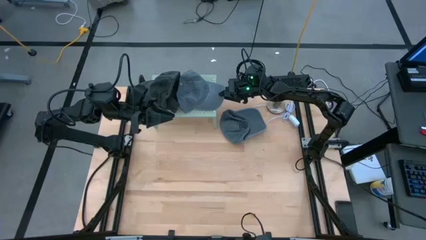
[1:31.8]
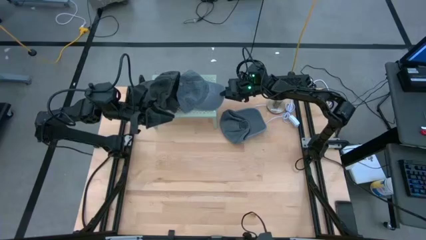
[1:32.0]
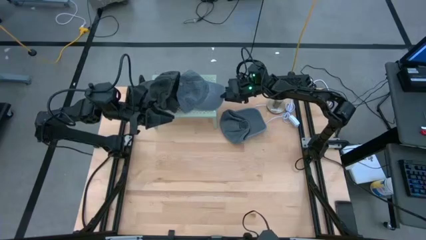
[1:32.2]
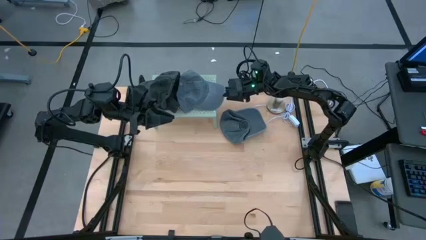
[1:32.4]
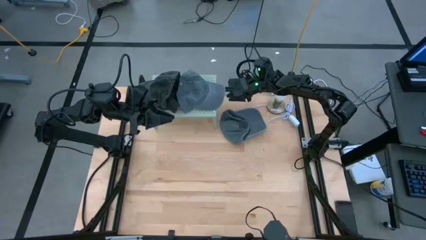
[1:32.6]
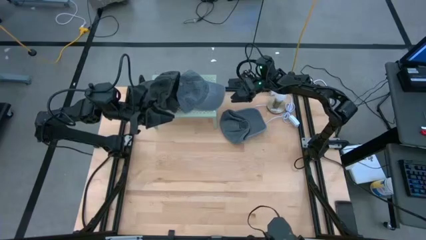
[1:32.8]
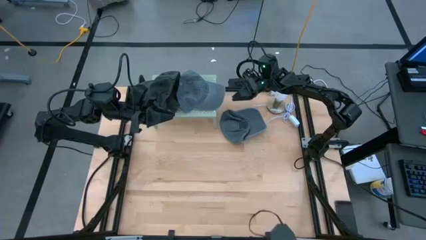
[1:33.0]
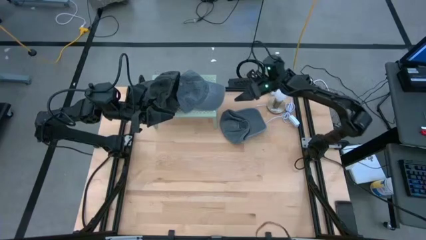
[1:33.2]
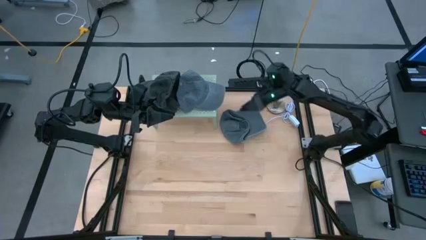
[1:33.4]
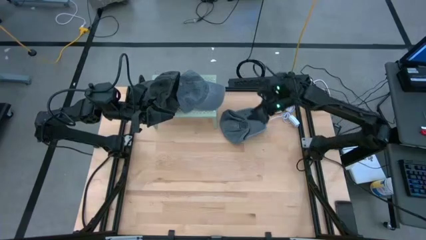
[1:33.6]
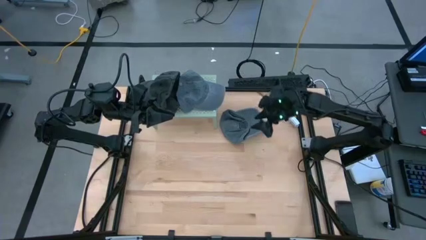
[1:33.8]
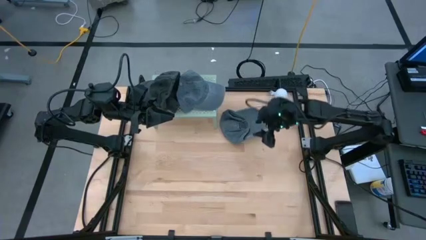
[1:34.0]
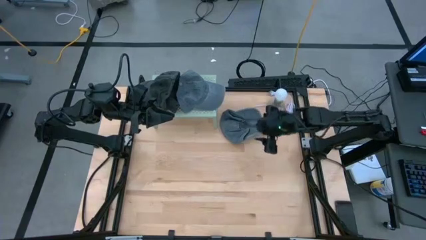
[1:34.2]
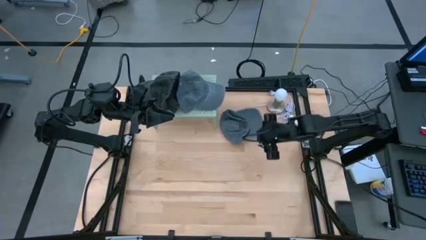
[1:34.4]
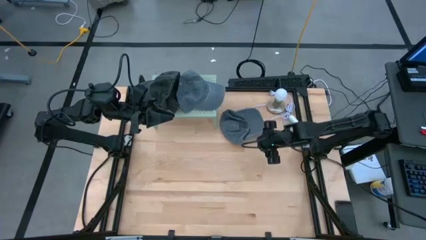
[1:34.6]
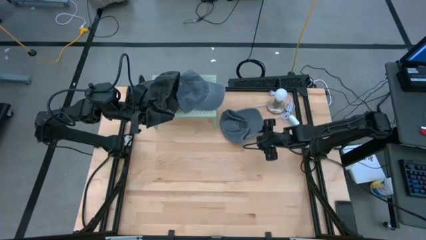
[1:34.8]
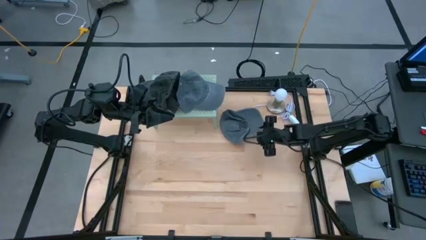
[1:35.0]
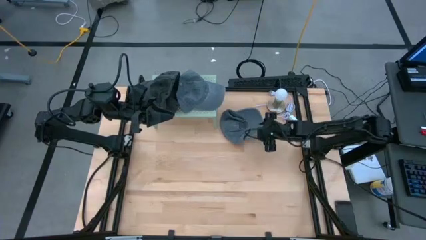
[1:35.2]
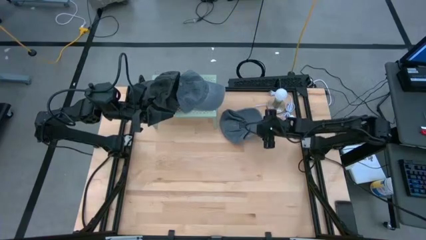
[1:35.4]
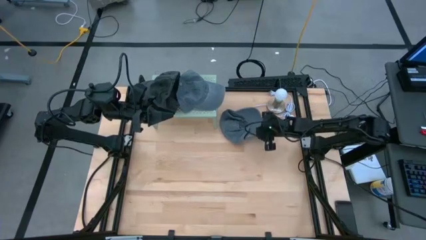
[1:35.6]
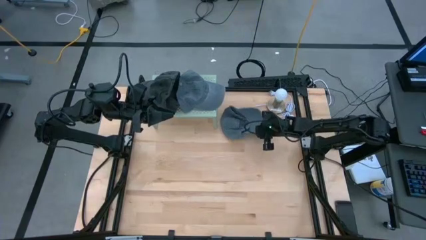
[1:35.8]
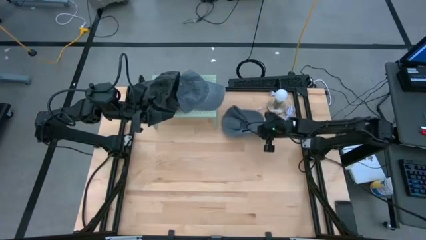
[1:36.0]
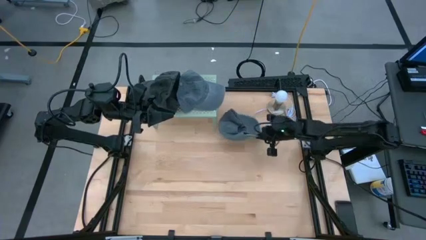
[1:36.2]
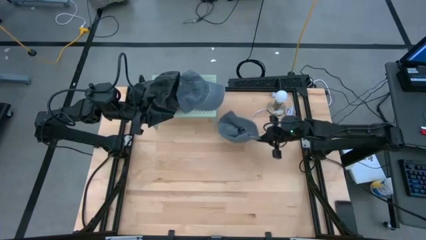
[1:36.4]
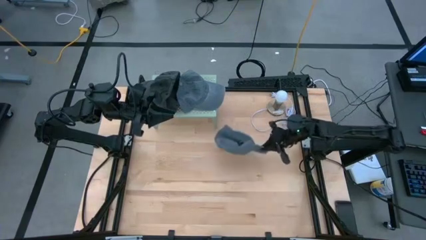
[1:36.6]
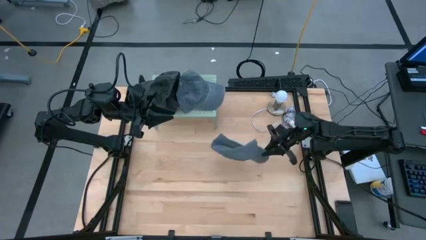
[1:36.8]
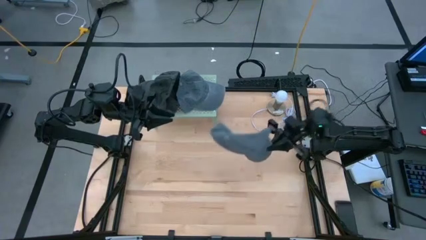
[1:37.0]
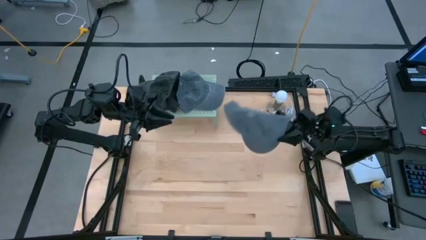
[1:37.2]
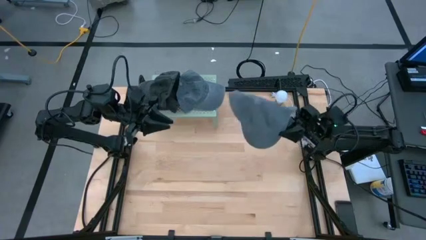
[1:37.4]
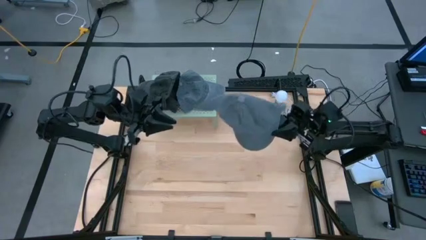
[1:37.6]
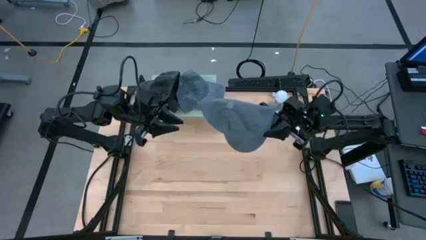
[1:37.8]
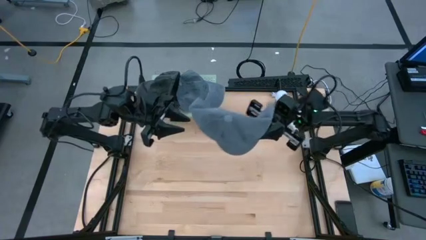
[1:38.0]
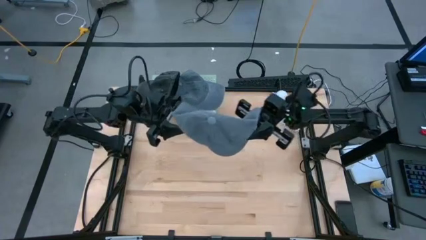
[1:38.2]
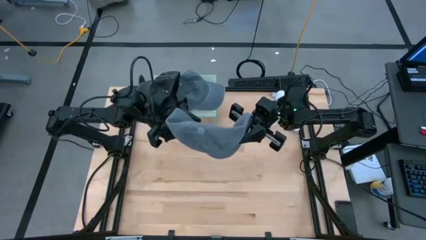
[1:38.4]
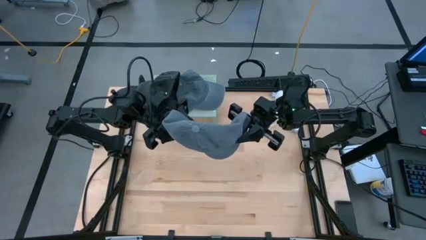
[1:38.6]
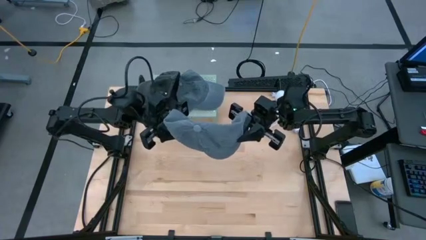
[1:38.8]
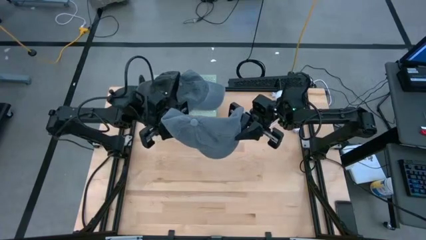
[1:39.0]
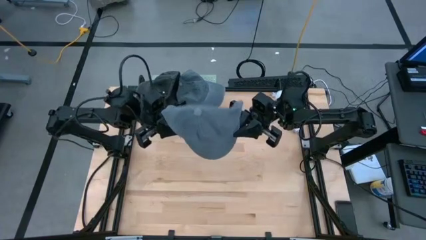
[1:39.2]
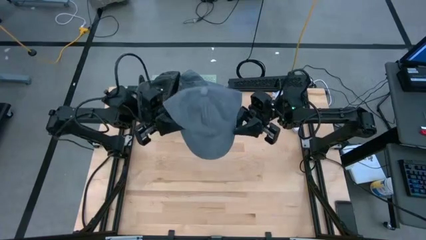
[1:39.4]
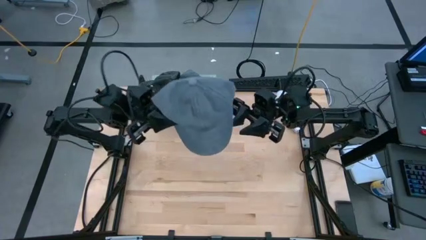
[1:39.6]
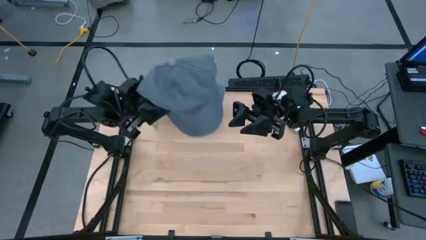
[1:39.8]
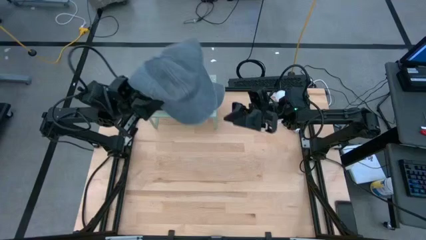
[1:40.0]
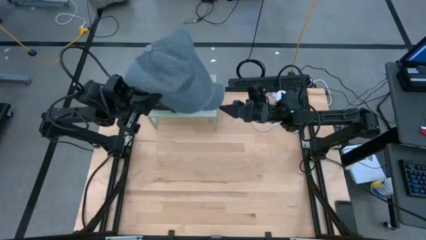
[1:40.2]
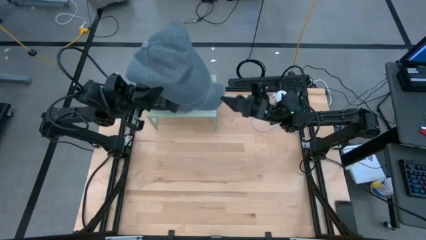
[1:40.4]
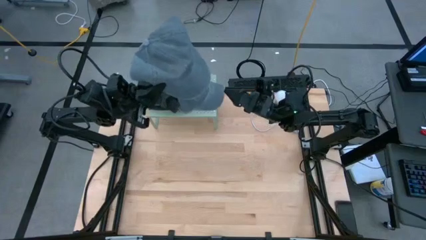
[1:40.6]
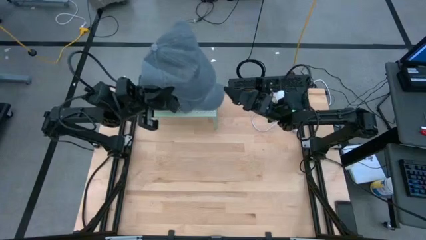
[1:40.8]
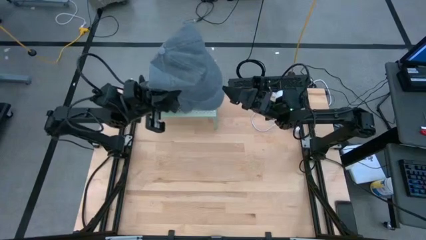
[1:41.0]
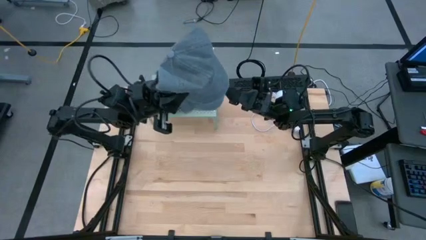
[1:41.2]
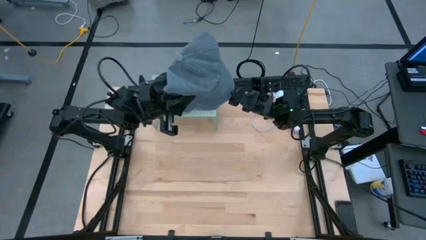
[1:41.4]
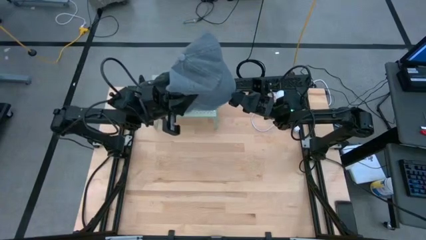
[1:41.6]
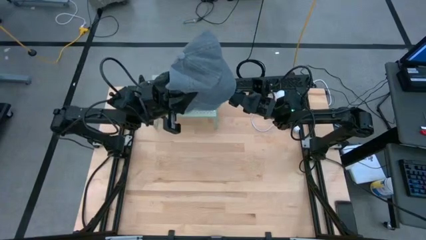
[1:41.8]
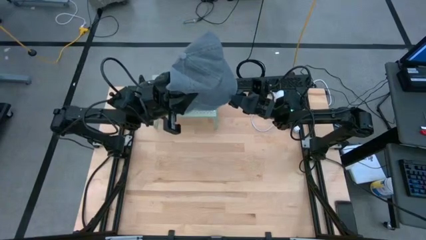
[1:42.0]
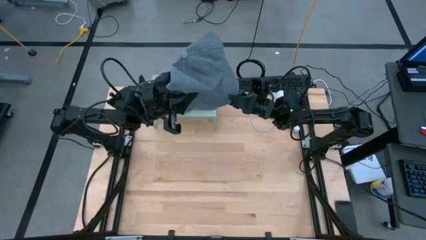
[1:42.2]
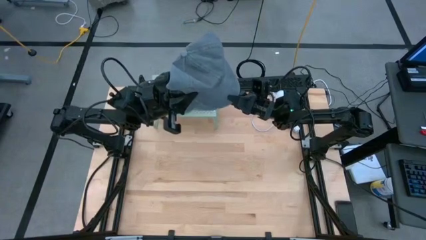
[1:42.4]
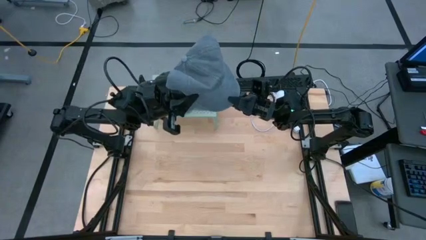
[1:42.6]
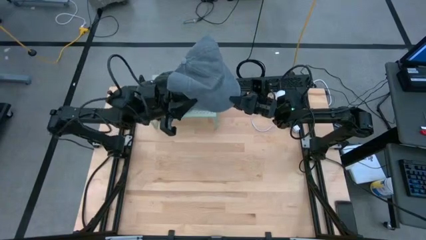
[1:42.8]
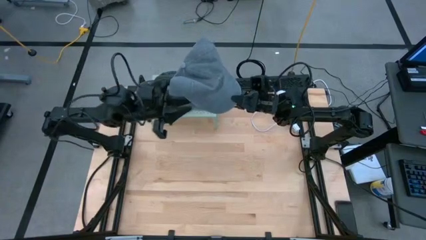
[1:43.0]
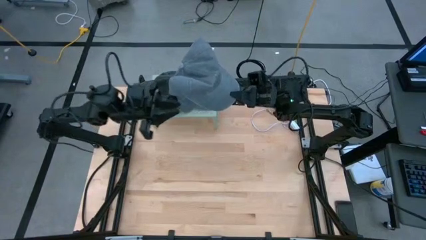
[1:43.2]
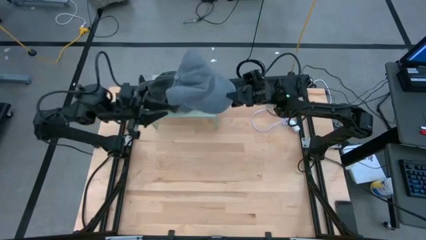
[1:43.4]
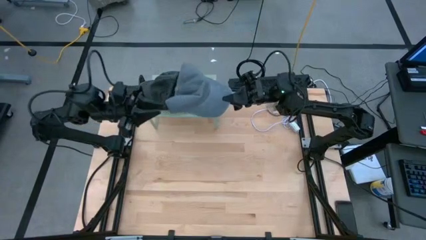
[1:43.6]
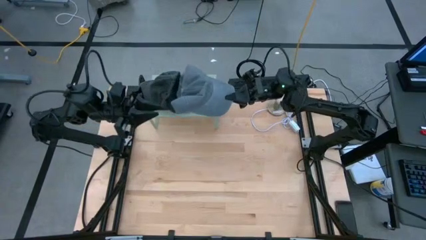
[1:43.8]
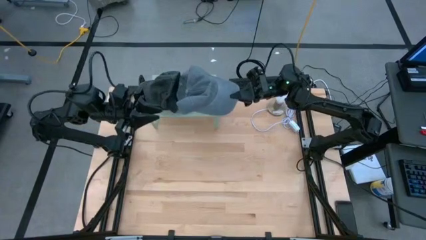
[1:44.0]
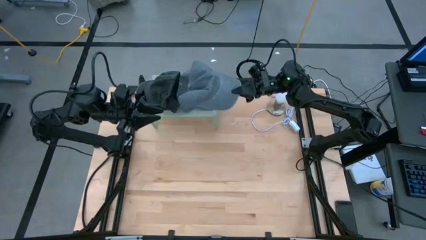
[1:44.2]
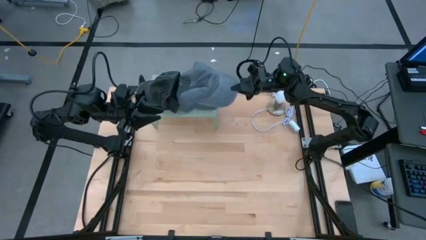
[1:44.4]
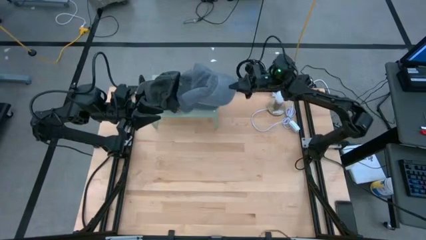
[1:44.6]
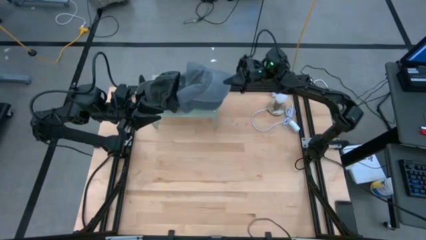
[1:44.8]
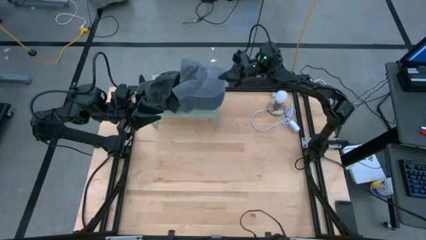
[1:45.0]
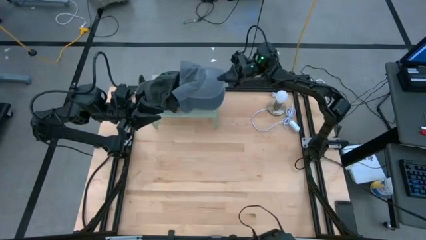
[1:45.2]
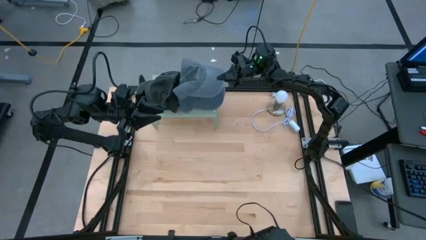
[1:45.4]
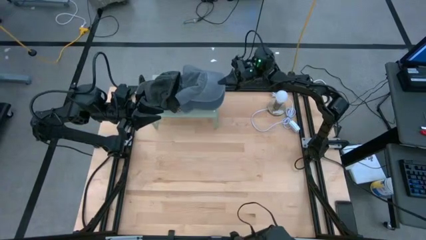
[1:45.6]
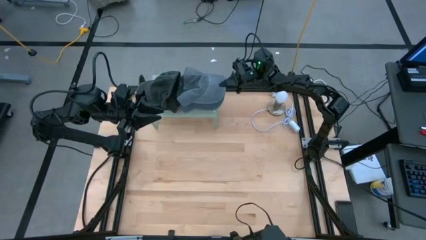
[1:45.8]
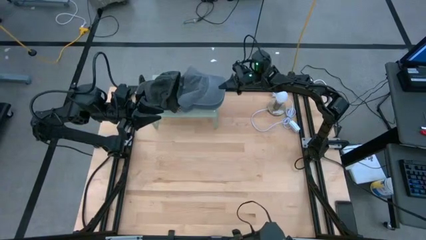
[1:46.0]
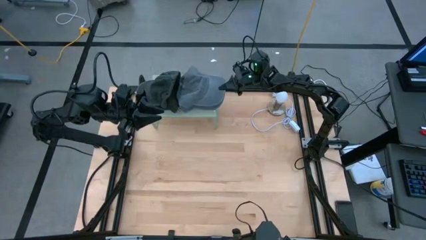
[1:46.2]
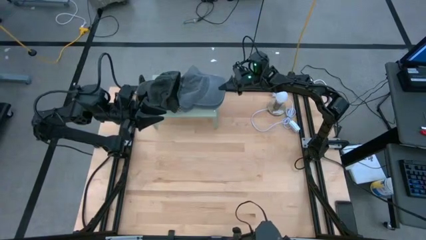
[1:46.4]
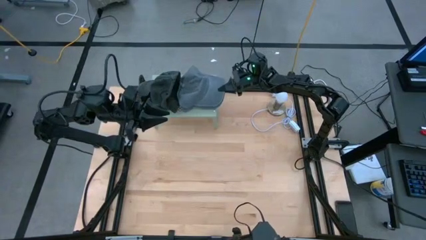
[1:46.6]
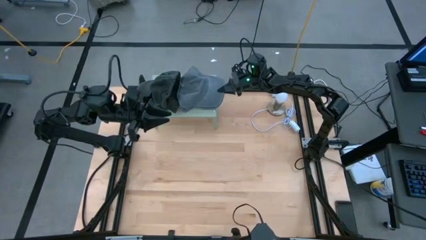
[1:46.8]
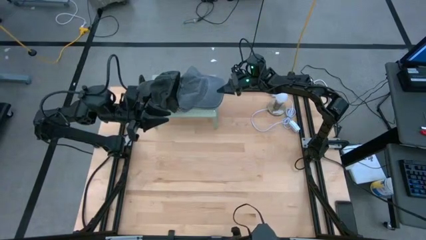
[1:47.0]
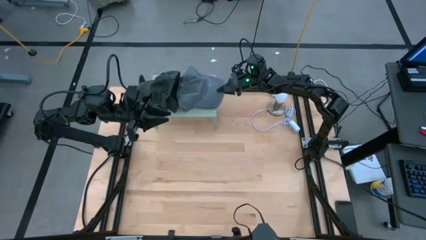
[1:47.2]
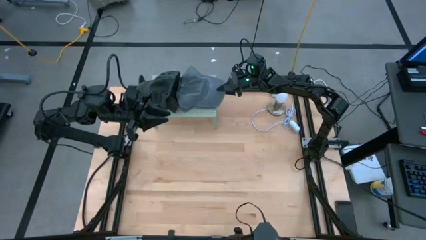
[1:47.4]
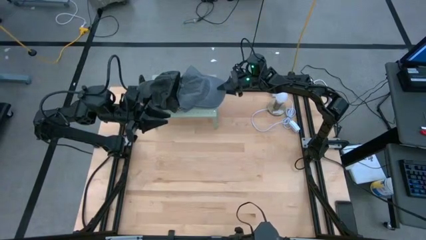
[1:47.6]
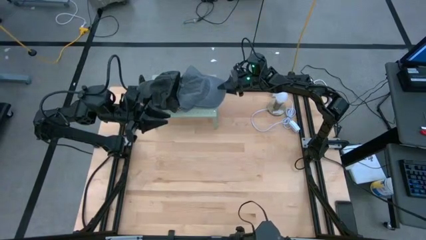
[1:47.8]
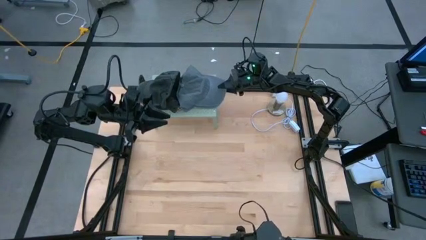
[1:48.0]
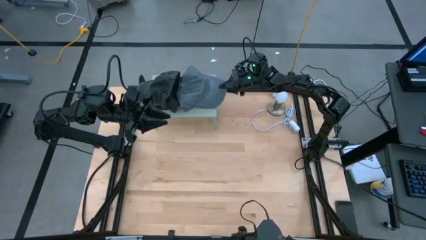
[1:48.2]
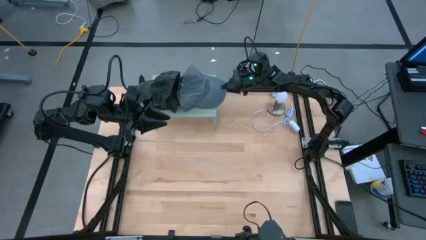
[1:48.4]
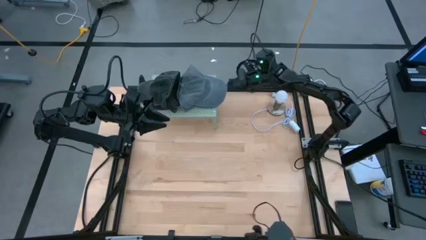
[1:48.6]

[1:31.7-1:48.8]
Task: Pick & Place hat
Stack the gray cap on the gray cap on the shelf
